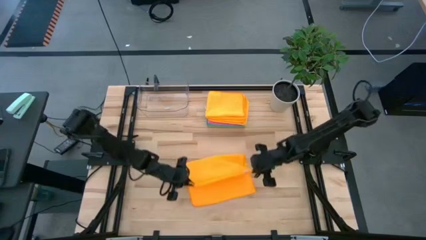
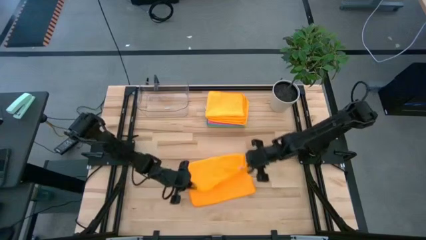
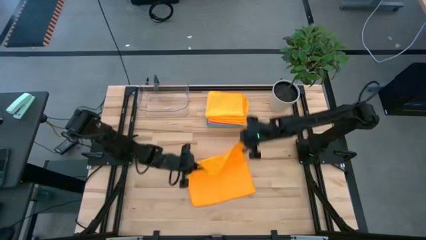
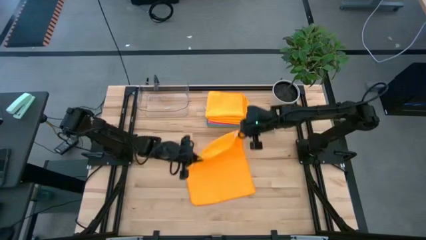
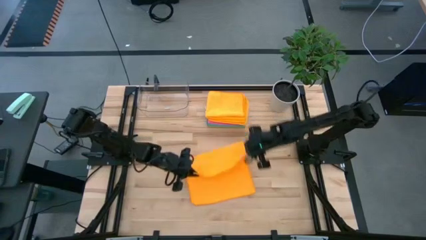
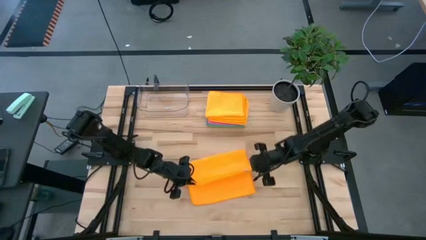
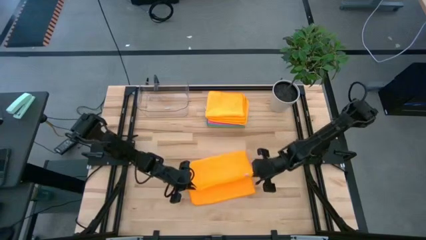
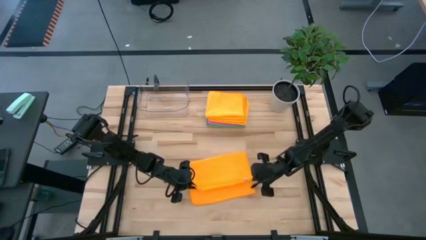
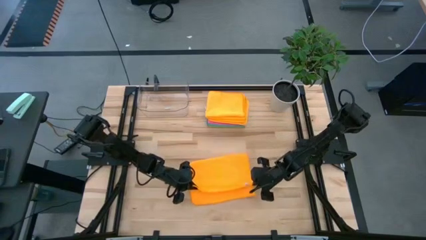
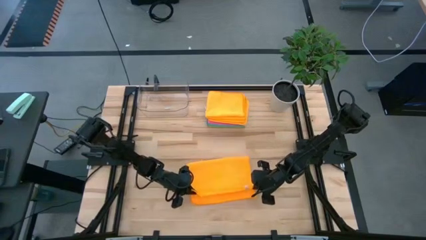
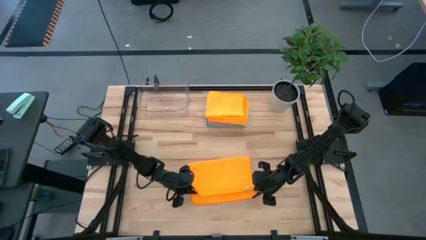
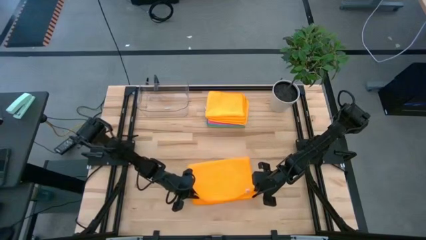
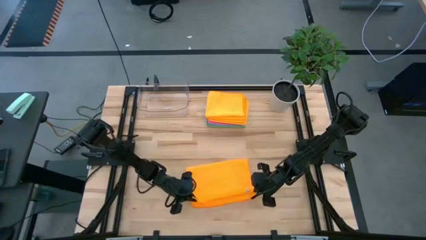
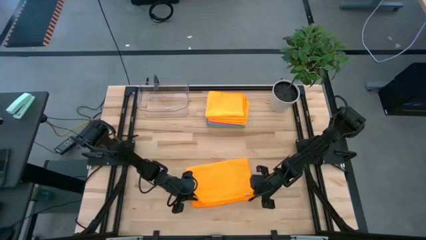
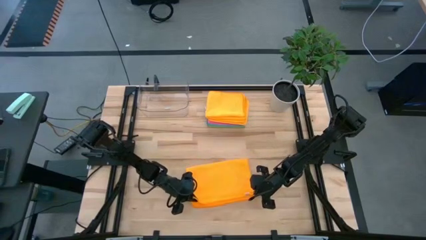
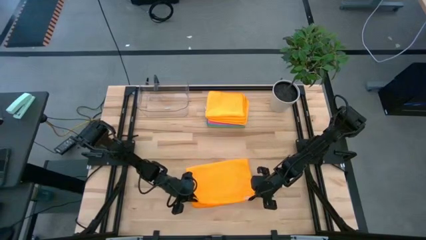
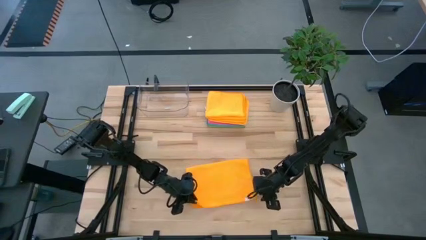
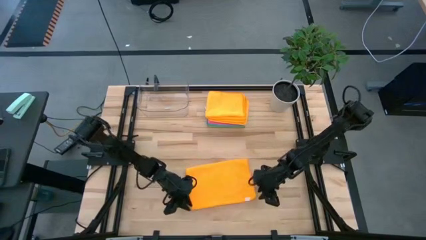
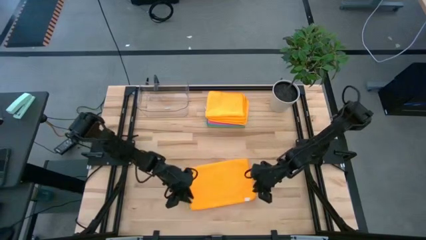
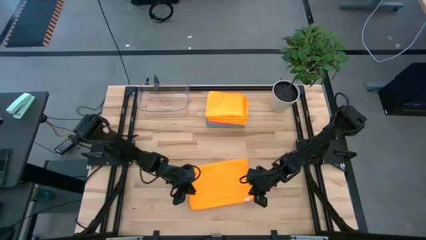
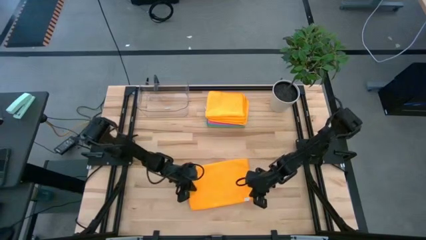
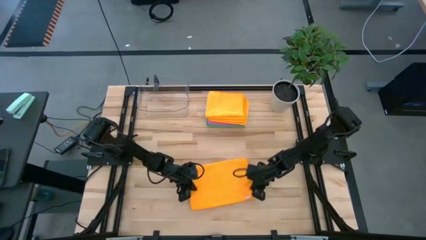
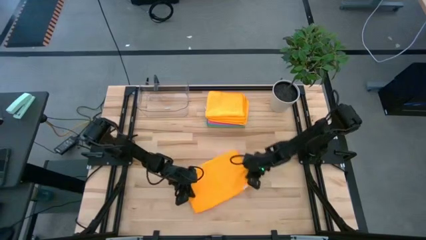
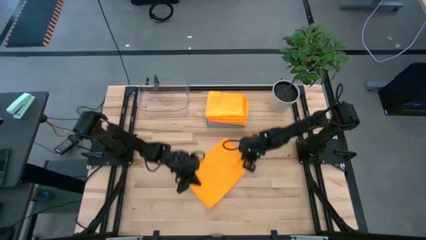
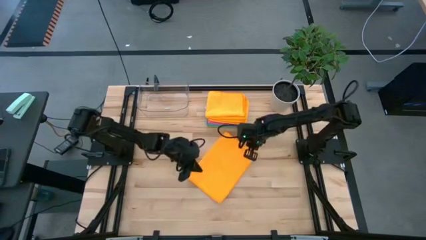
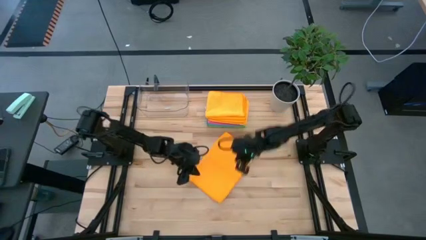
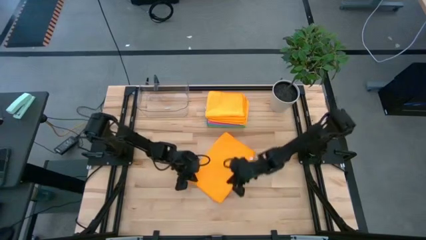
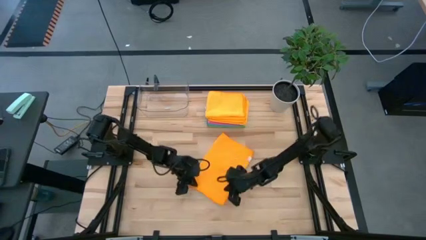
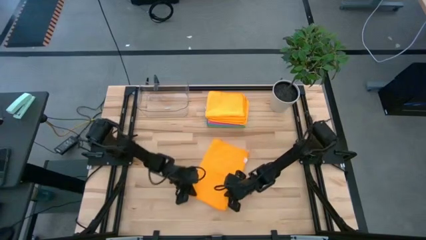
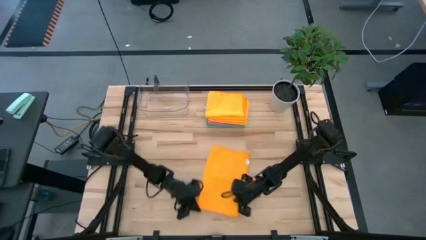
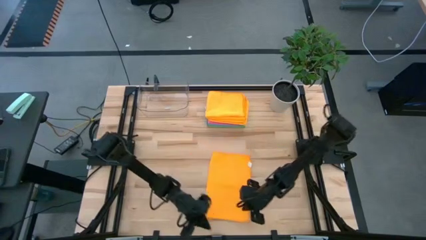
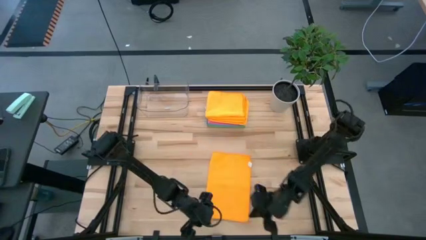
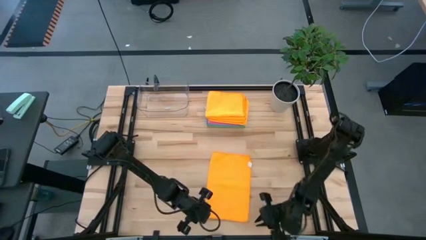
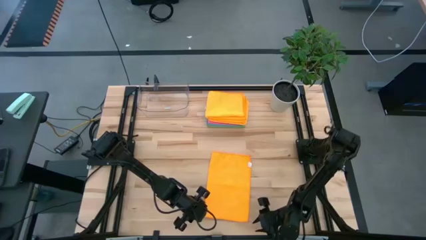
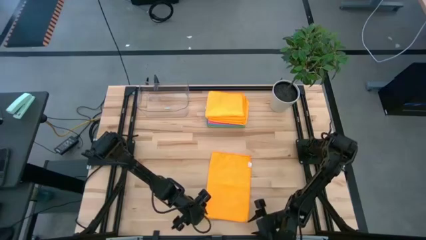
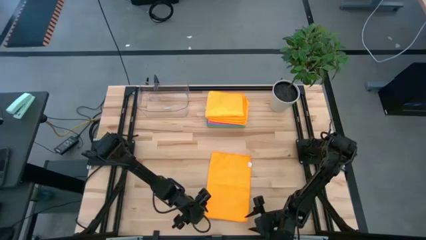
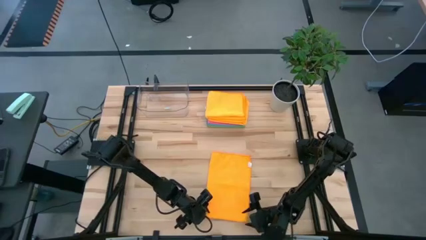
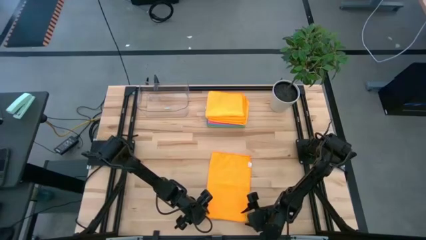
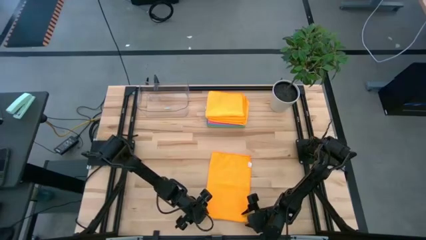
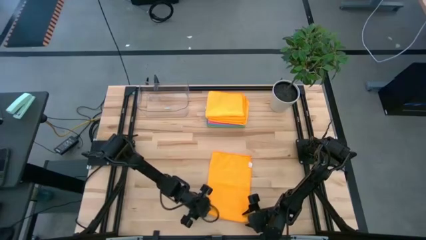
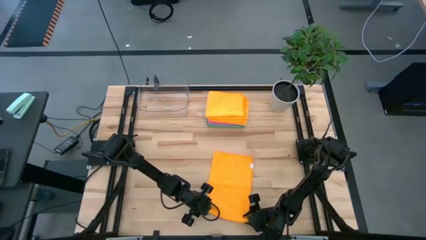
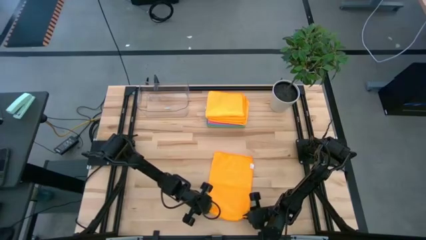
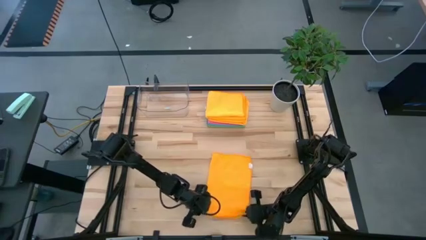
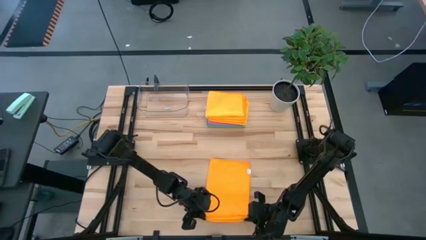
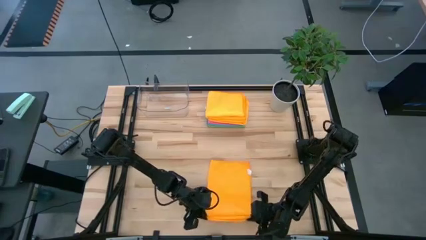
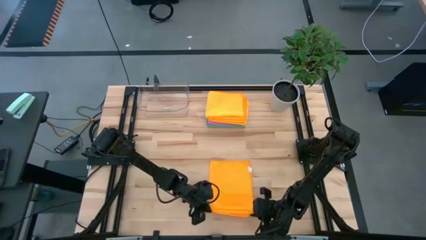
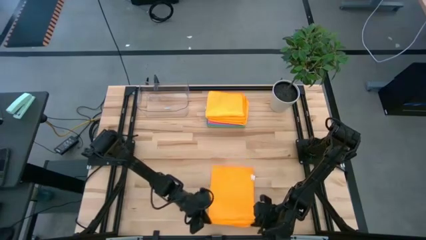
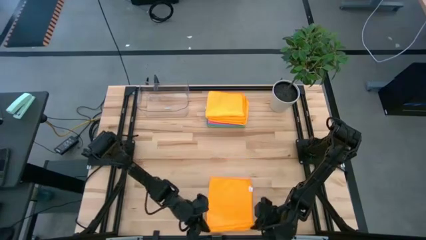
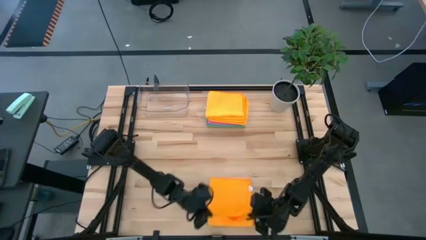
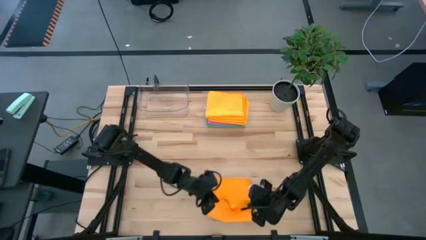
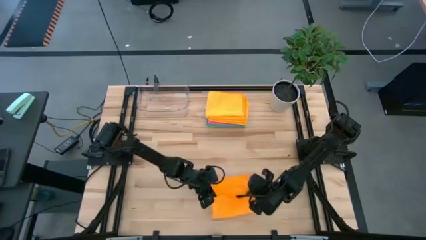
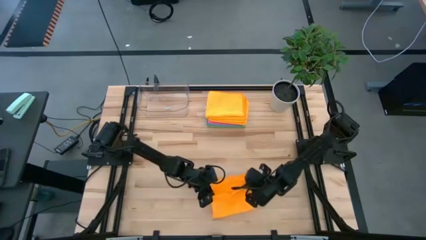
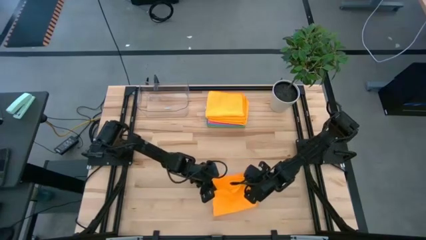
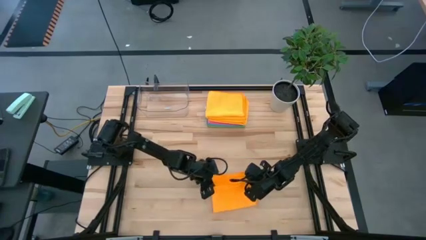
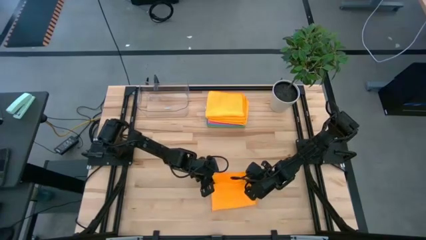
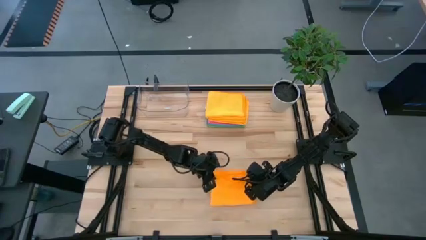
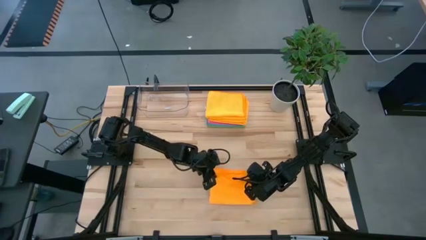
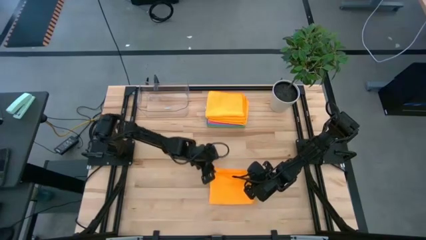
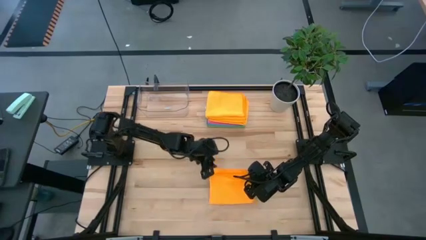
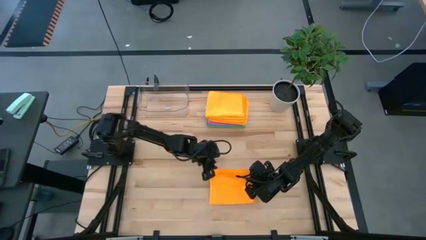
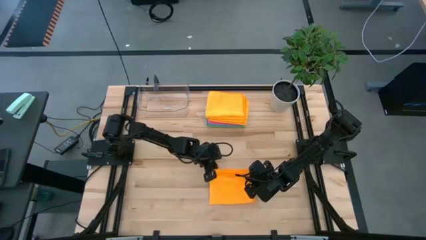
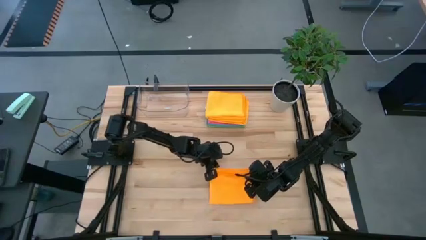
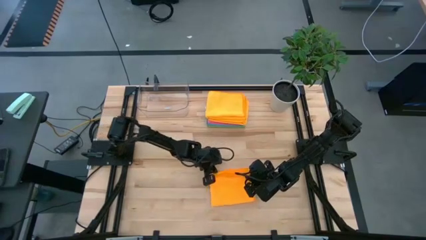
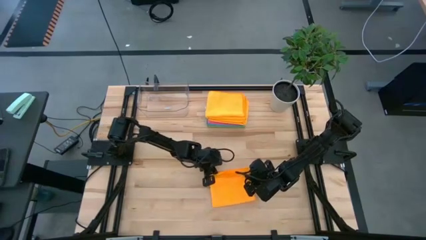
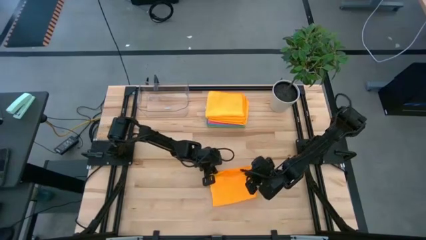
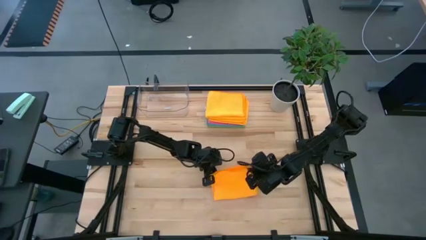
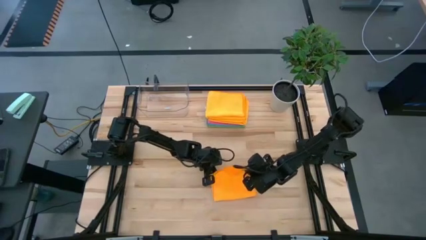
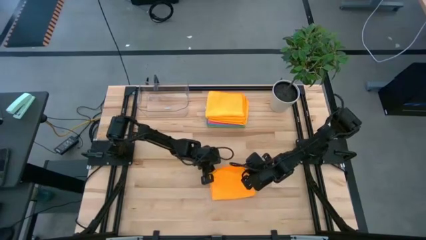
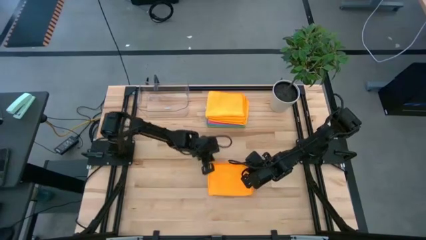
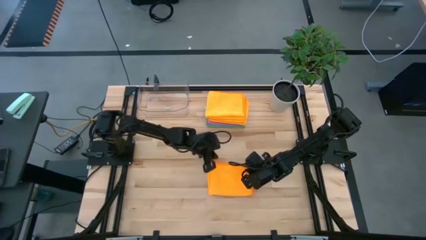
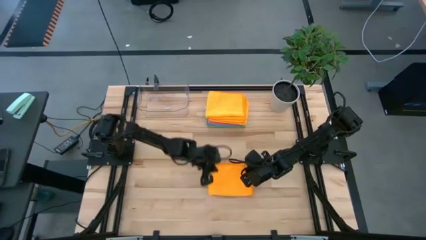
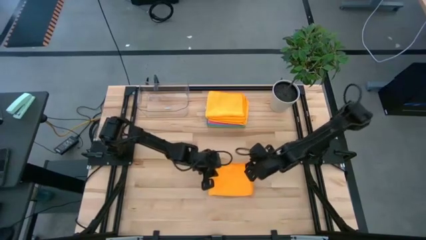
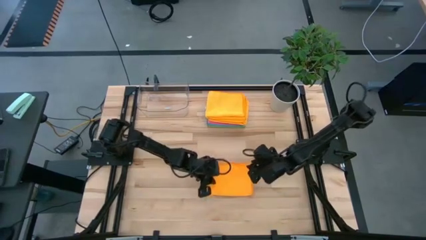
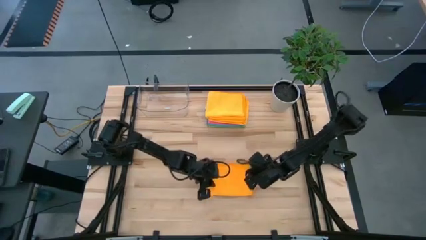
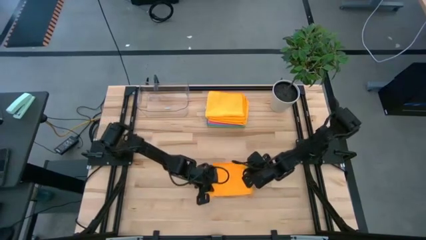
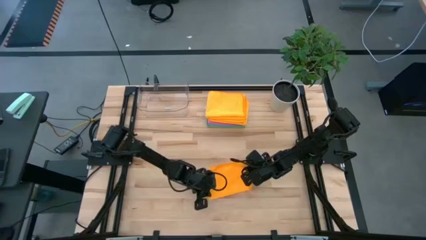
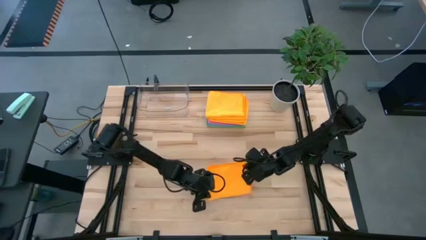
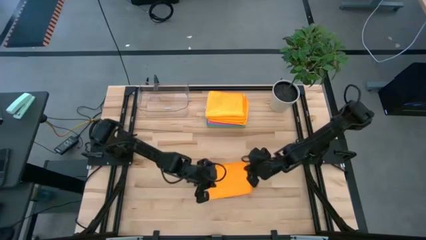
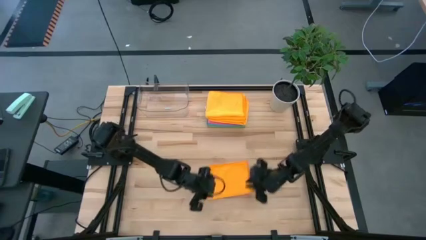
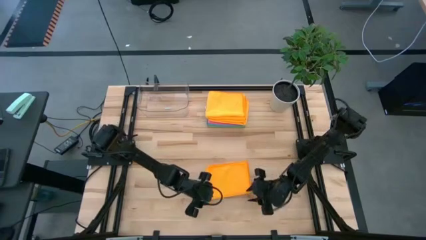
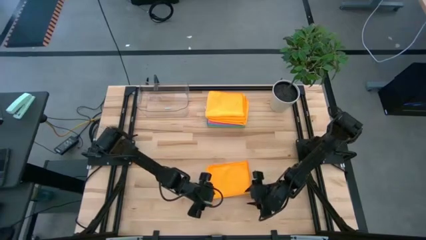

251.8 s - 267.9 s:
Task: Fold microfiber towels
Fold the orange towel
